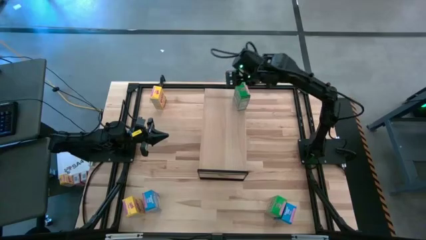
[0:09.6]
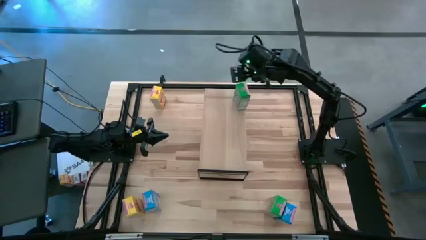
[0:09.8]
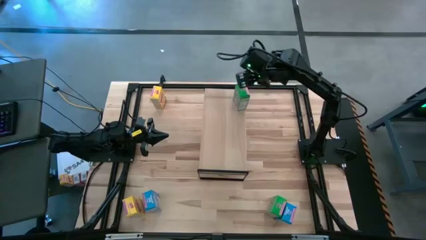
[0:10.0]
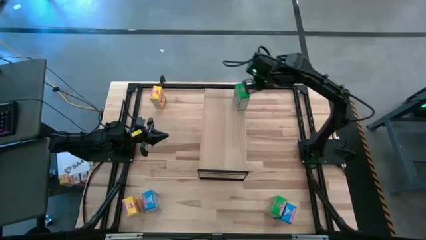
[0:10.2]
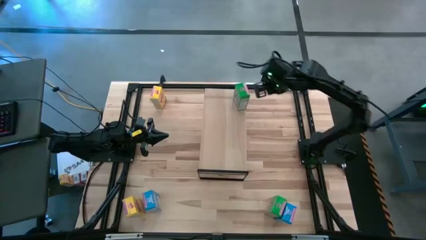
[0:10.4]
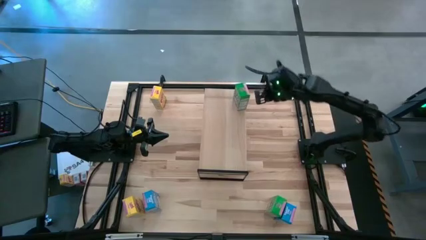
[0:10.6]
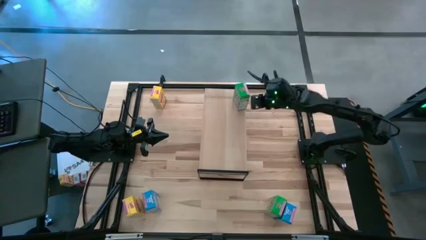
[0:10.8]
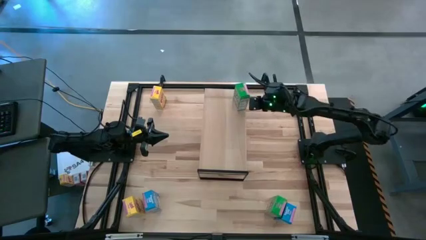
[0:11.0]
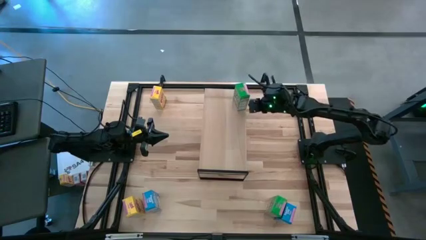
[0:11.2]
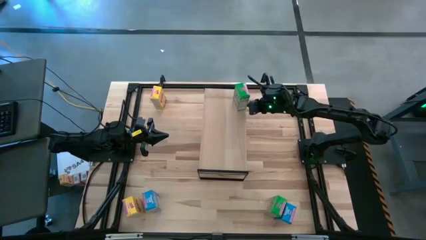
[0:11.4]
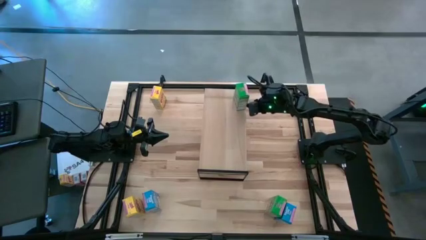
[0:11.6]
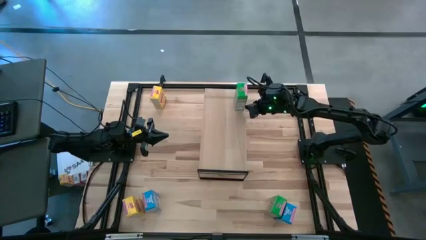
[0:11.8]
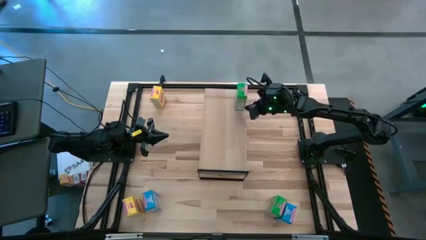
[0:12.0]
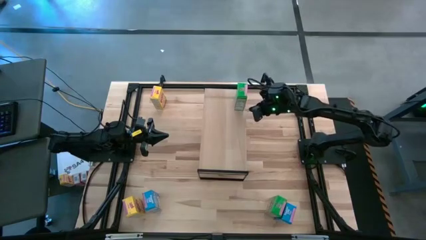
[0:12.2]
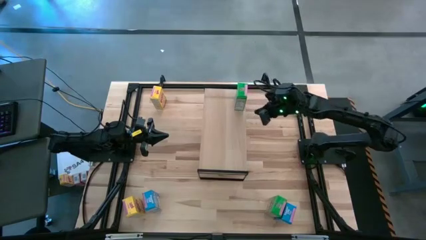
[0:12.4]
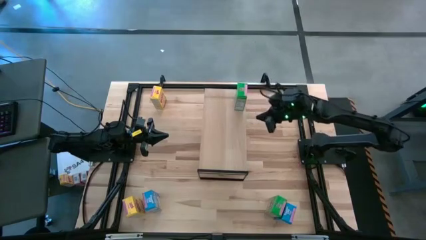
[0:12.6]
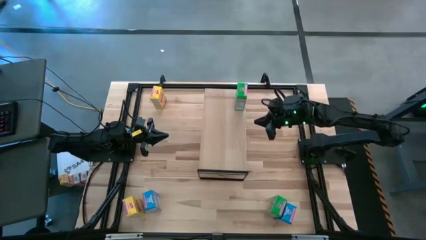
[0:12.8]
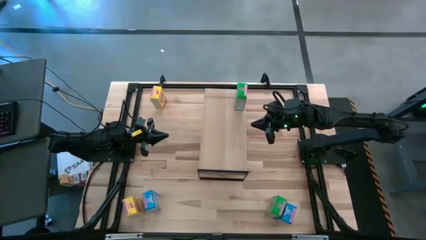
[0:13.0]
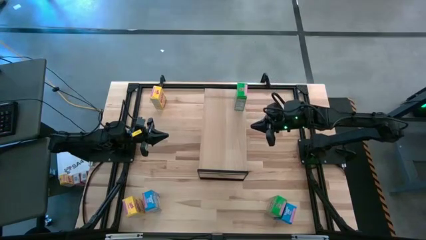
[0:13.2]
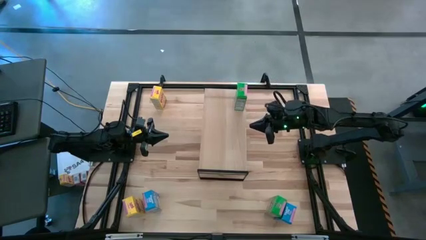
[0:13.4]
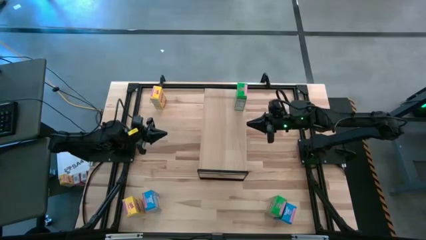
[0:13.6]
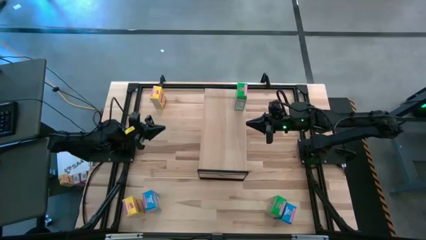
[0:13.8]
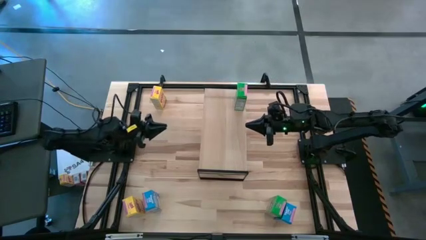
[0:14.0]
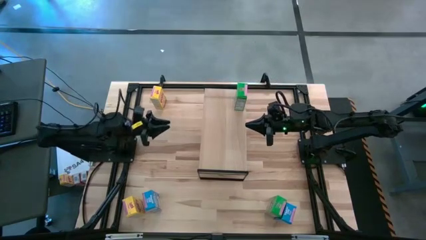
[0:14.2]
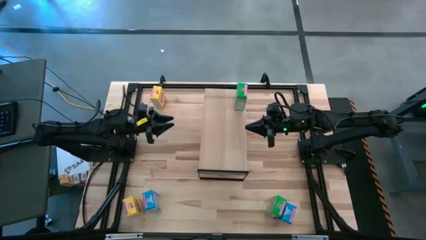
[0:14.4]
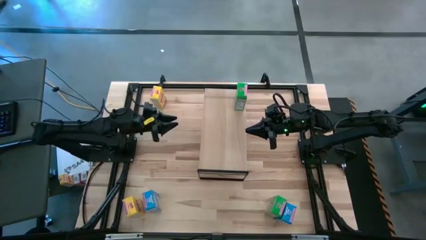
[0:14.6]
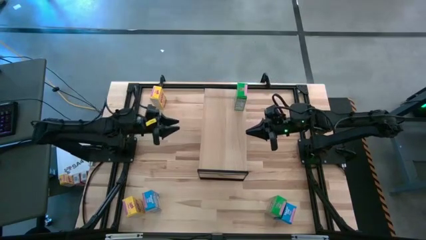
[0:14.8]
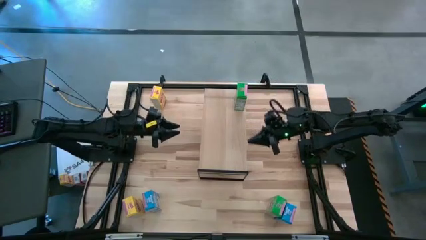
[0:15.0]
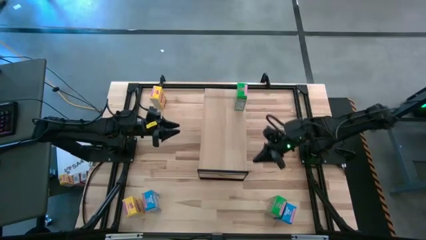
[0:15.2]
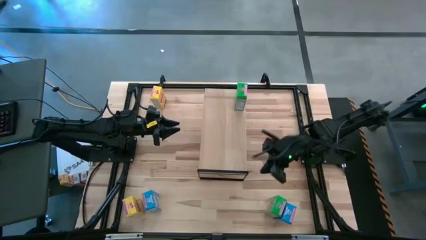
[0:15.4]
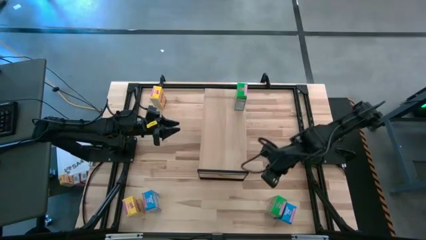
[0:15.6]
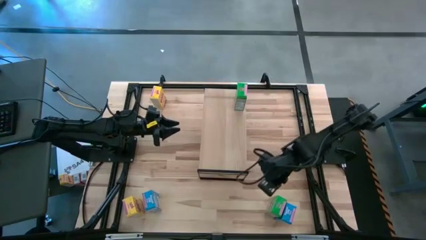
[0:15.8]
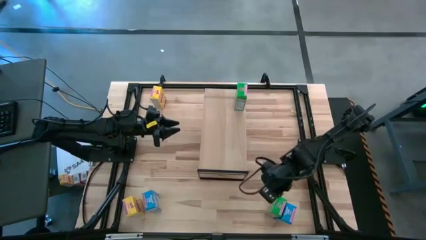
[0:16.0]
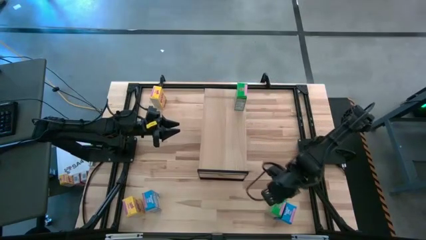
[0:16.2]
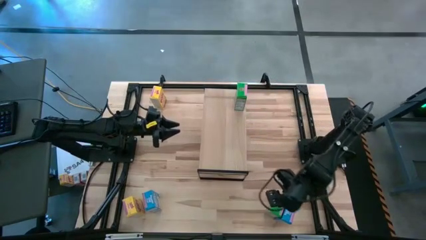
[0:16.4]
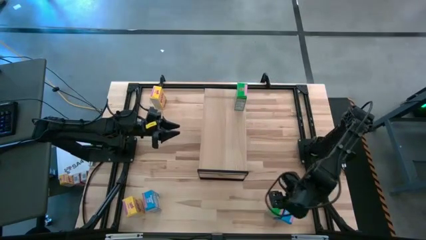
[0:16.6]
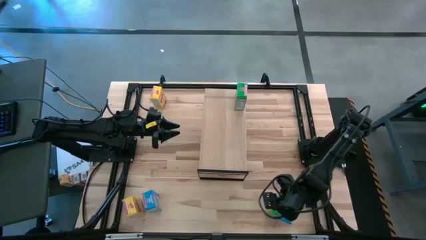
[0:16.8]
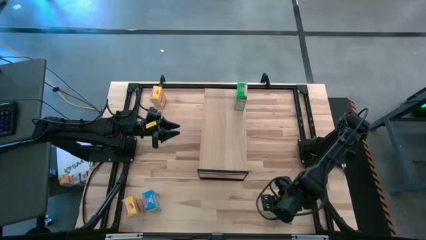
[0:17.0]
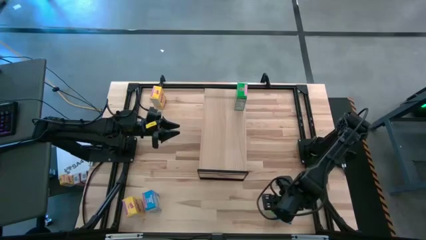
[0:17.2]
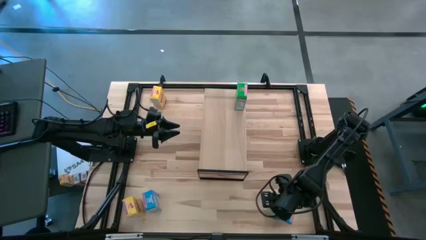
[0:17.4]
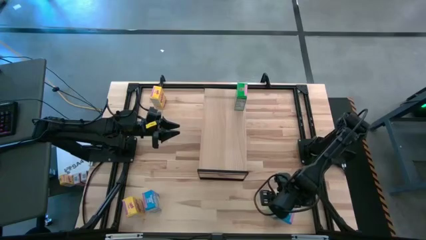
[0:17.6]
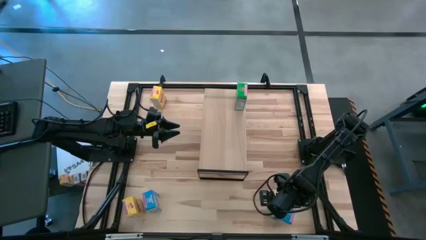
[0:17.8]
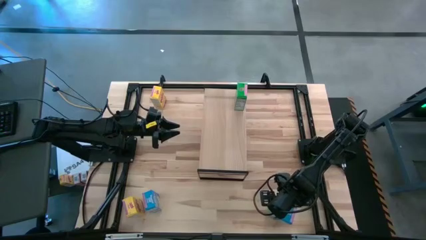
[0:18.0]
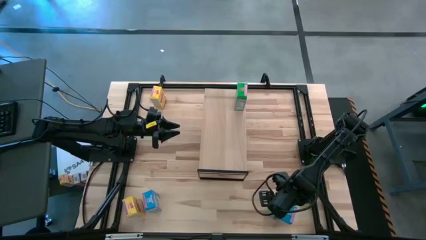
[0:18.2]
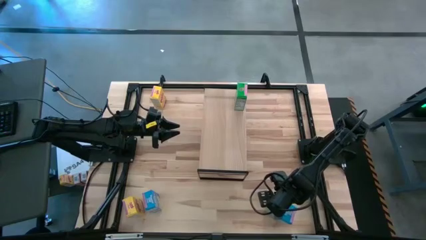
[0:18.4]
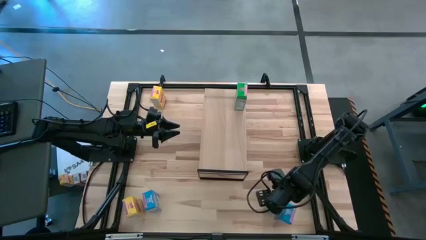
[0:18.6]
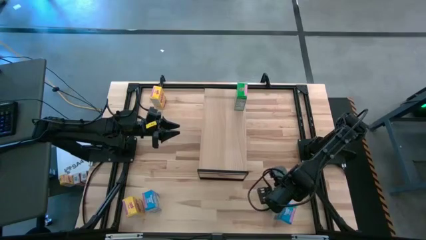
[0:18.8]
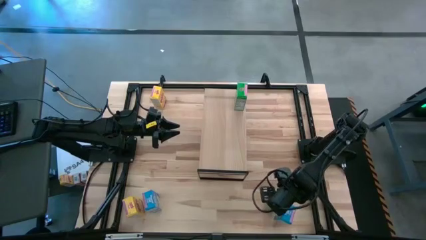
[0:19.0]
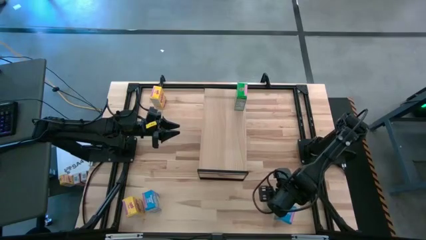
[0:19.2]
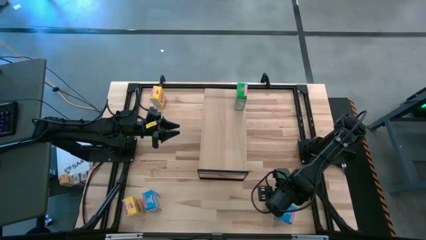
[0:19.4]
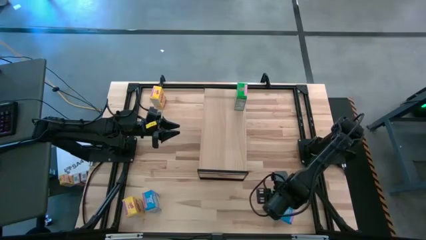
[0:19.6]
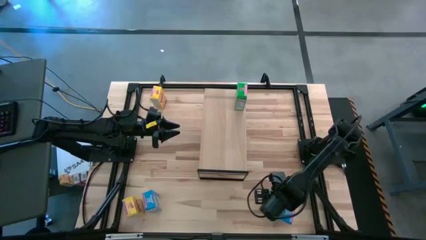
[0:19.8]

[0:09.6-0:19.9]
Task: Stack cereal on shelf
Put the green cereal box on the shelf
